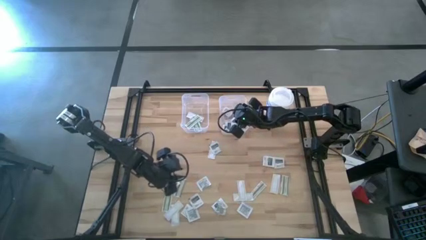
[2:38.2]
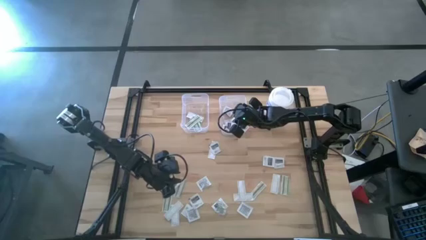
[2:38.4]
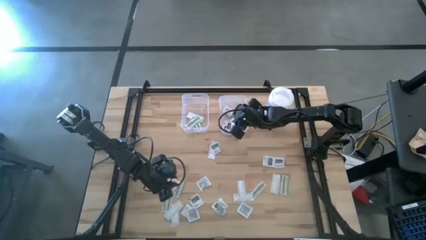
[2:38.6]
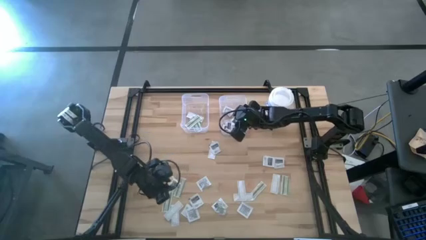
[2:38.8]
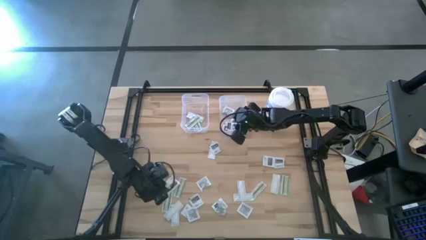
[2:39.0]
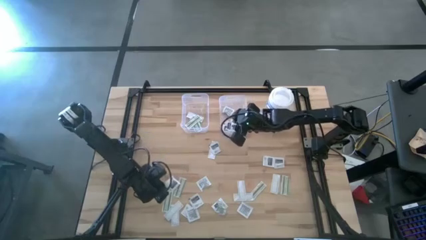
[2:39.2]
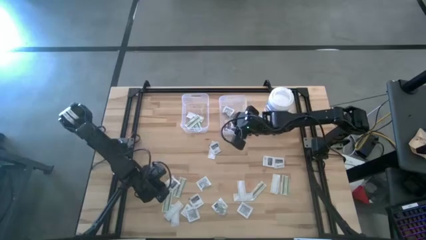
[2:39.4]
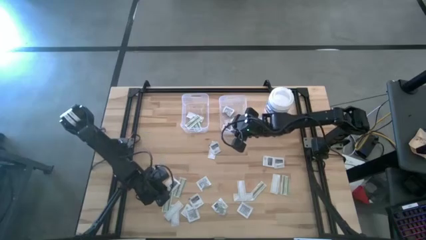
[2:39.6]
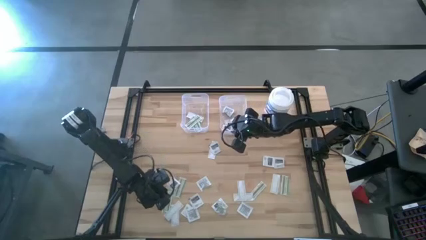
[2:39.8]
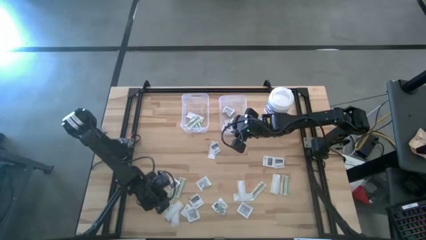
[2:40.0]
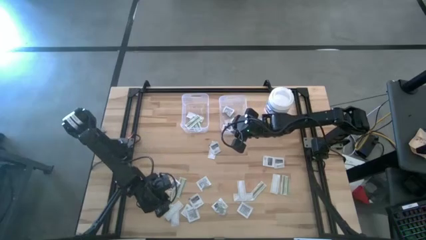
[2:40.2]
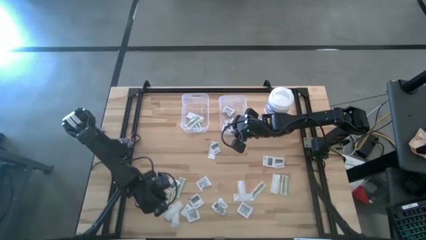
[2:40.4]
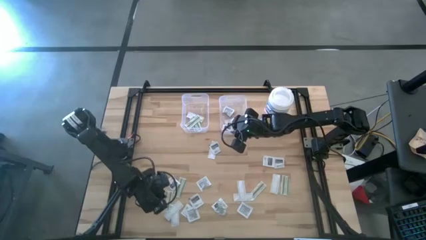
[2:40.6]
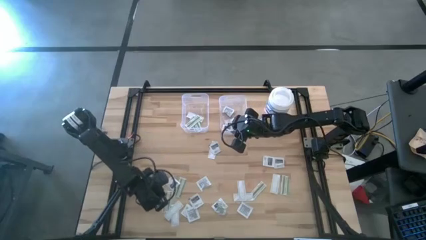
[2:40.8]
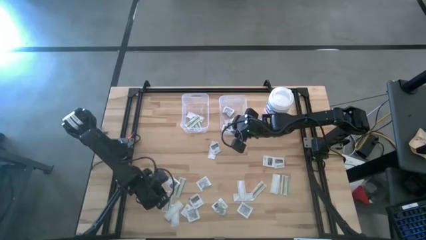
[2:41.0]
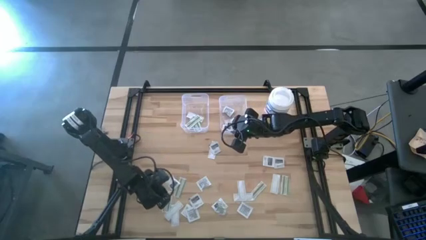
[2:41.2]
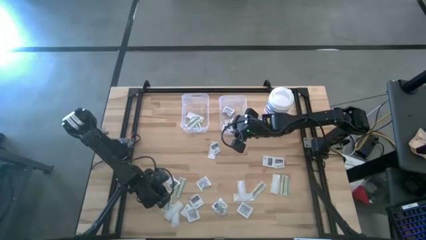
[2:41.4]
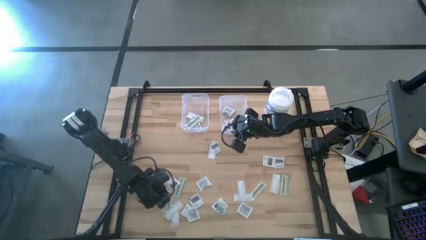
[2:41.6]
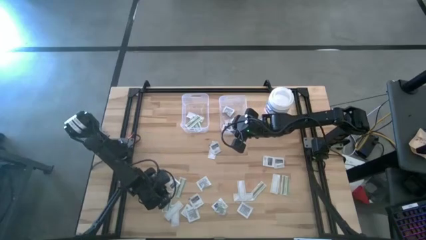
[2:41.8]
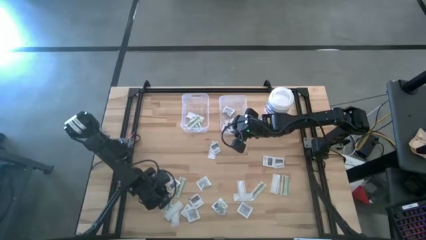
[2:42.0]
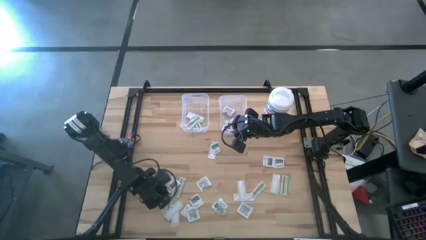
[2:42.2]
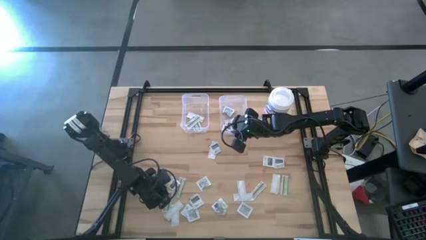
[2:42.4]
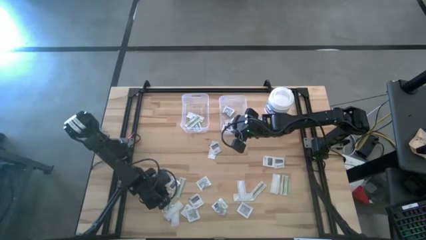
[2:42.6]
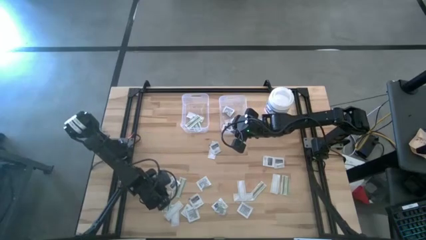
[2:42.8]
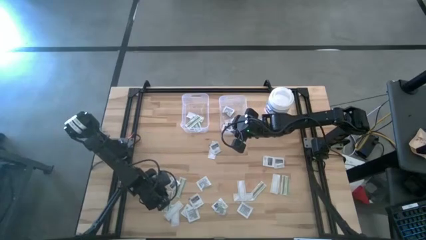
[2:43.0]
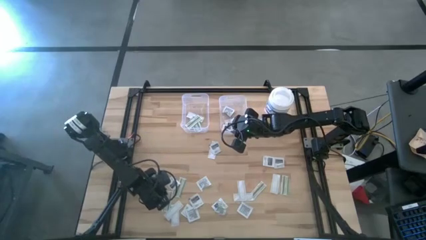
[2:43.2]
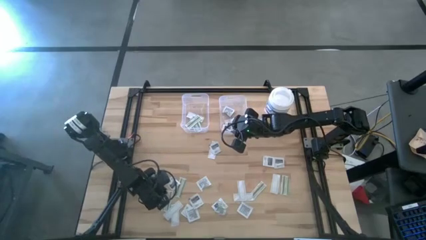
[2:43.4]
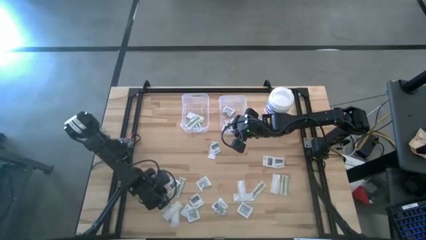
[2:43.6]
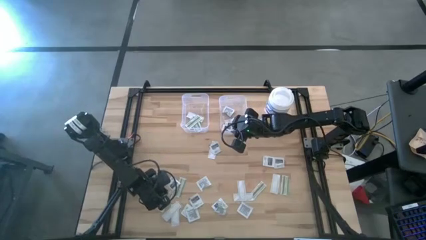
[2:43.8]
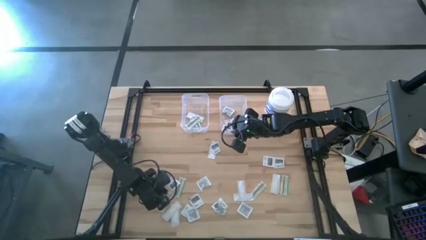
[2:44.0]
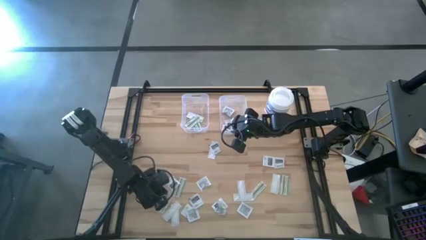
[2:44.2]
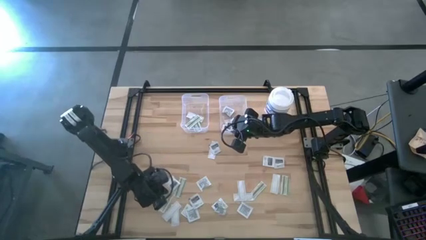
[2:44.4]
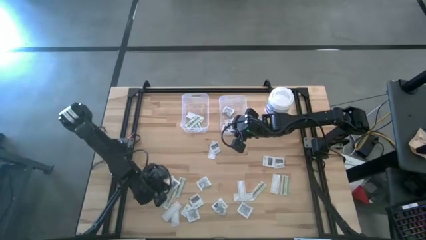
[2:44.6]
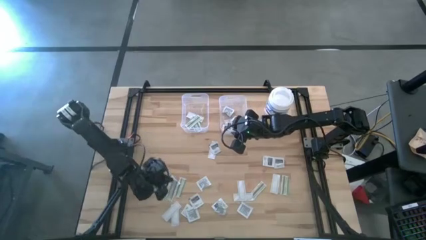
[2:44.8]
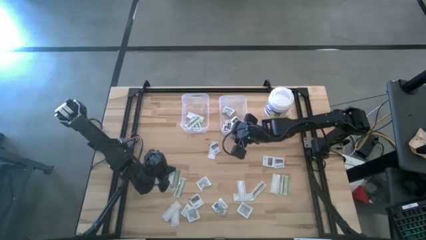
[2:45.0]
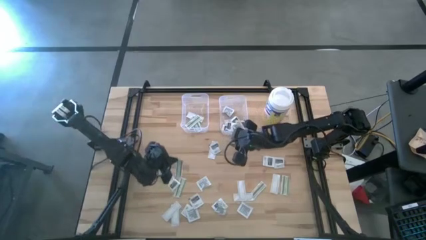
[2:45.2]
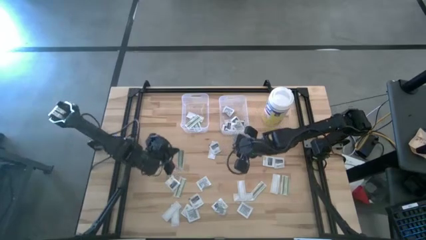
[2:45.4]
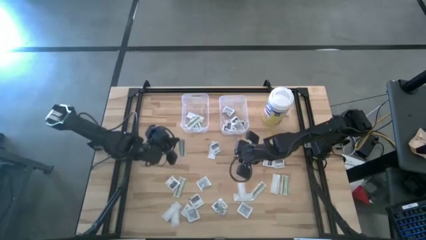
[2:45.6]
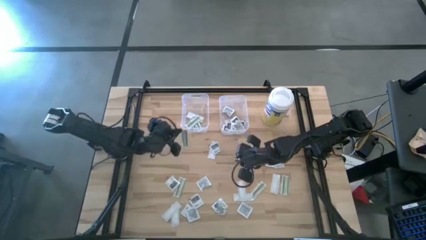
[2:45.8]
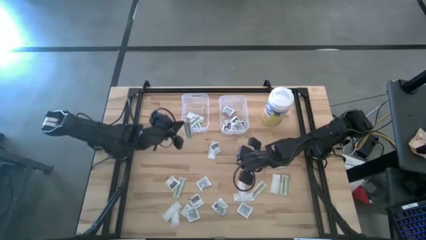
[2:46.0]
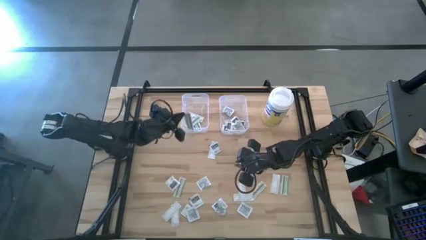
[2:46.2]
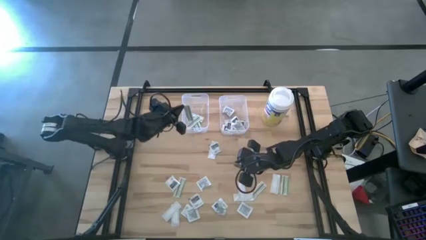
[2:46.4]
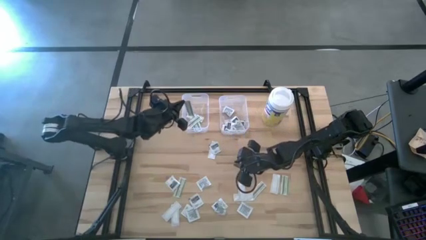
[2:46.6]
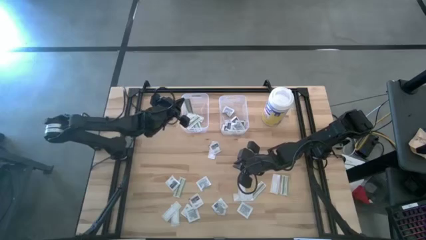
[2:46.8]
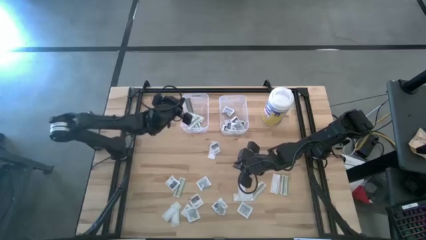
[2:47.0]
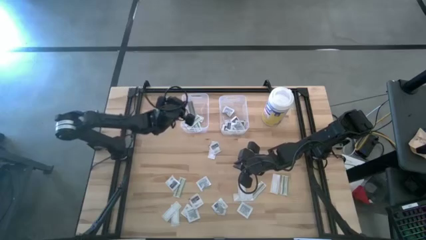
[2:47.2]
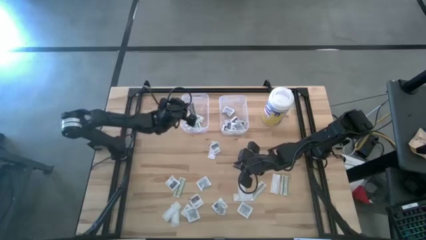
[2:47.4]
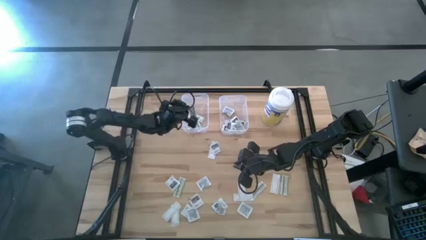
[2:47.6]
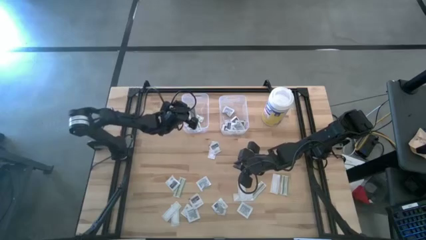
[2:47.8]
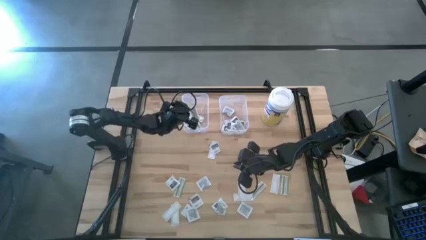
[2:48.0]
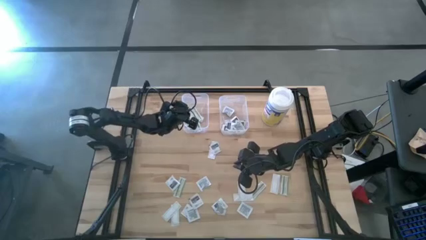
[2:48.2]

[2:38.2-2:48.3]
Task: Pick & Place First Aid Supplies
Put the green bandage pack into the left transparent bin

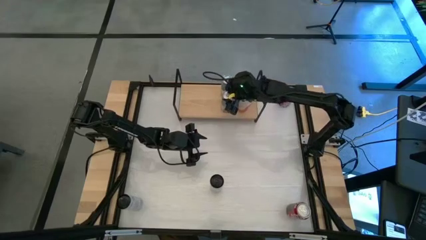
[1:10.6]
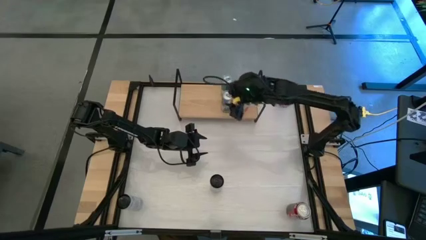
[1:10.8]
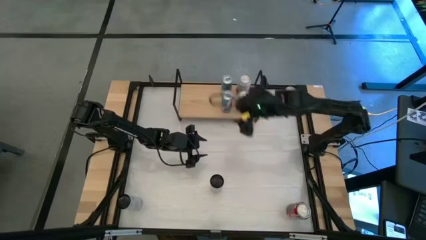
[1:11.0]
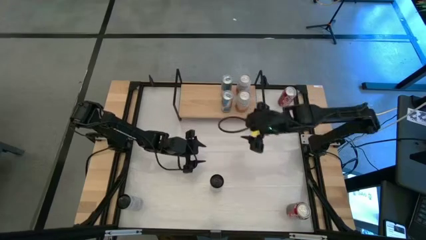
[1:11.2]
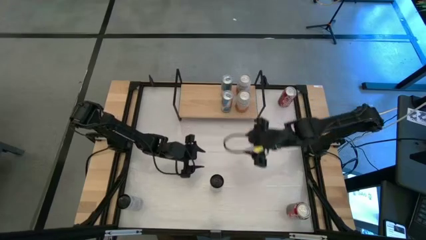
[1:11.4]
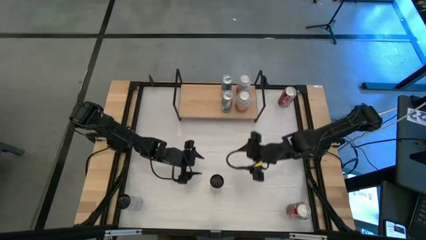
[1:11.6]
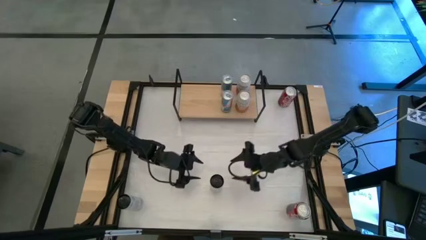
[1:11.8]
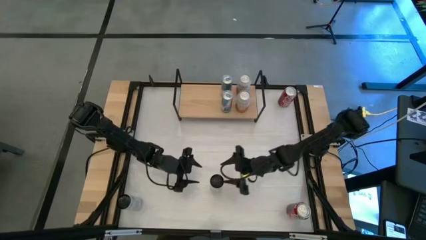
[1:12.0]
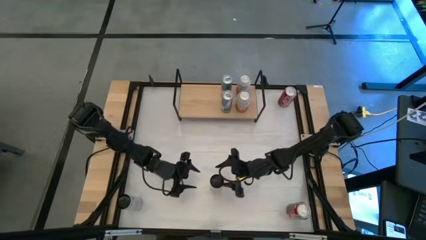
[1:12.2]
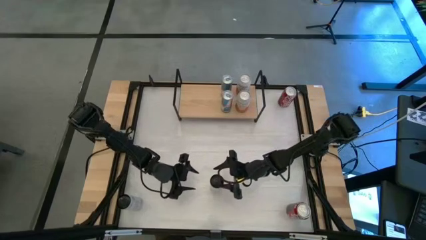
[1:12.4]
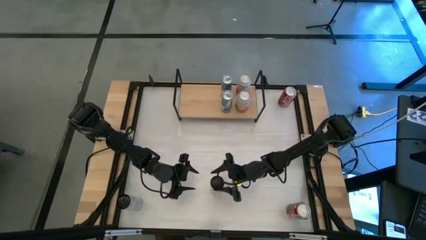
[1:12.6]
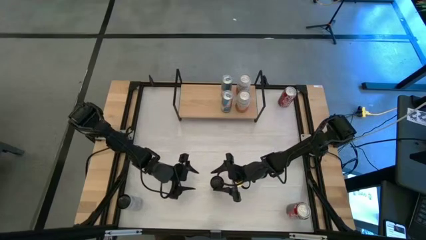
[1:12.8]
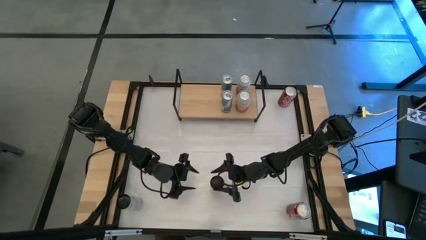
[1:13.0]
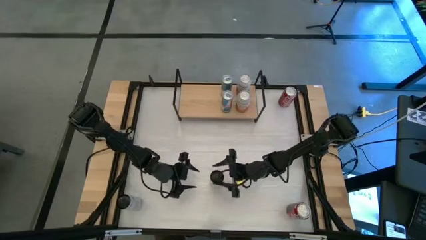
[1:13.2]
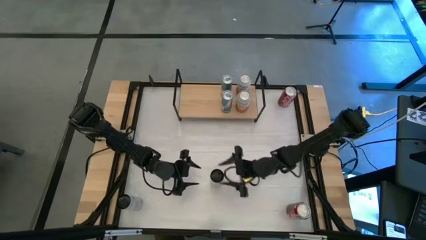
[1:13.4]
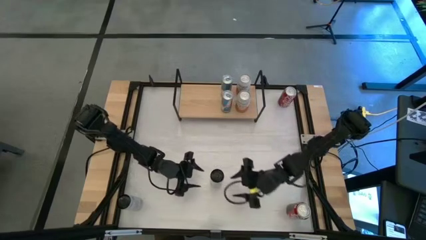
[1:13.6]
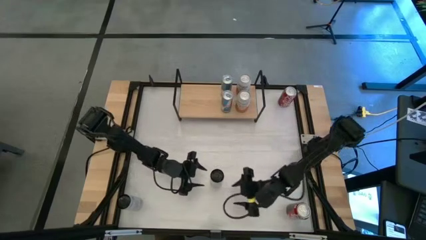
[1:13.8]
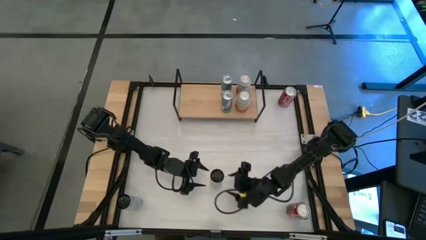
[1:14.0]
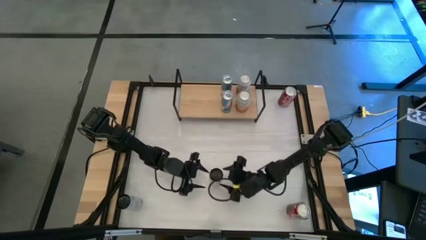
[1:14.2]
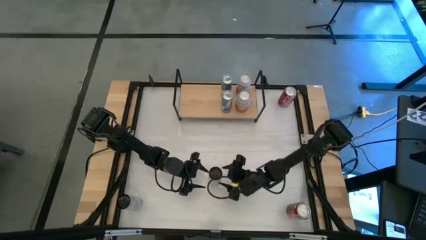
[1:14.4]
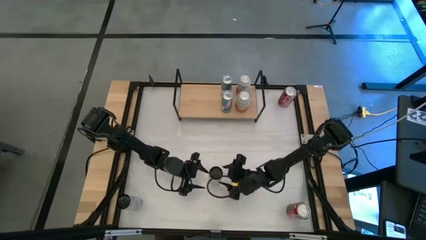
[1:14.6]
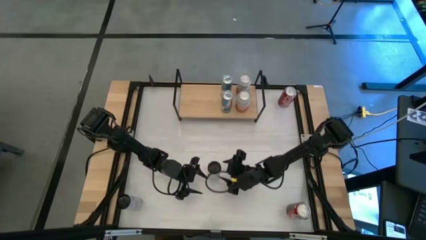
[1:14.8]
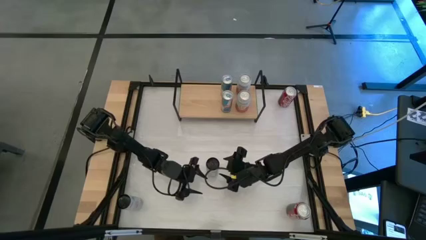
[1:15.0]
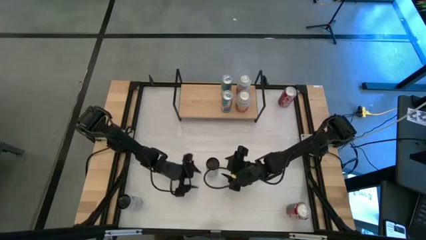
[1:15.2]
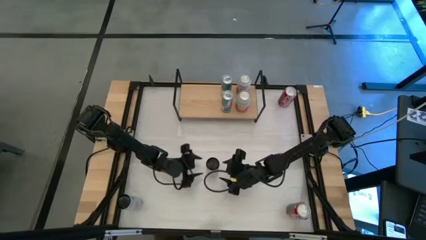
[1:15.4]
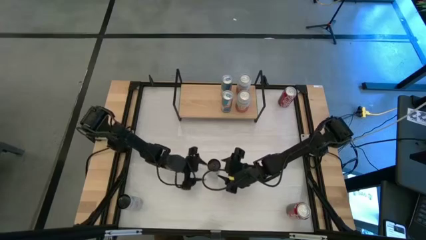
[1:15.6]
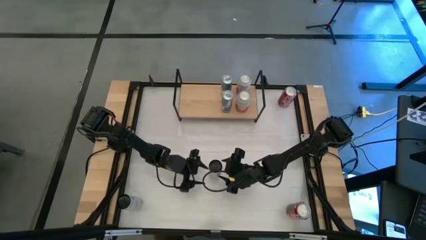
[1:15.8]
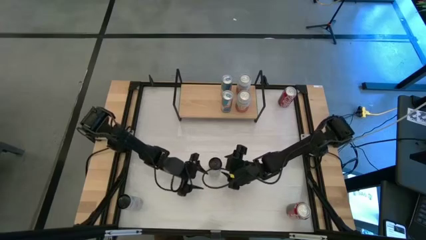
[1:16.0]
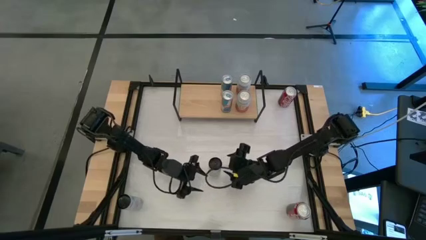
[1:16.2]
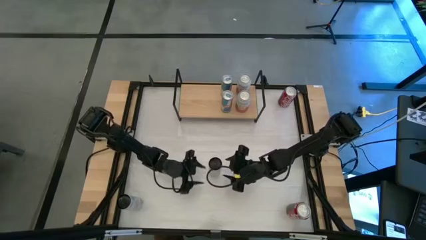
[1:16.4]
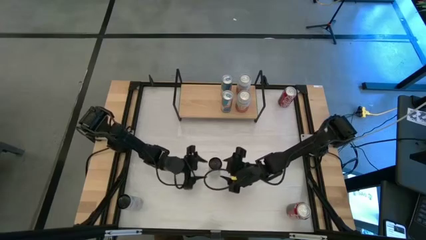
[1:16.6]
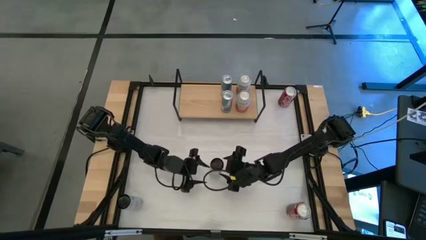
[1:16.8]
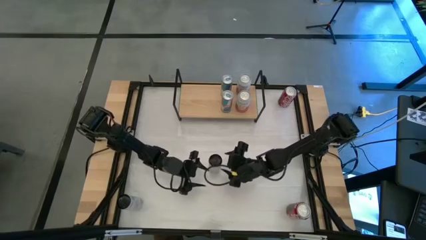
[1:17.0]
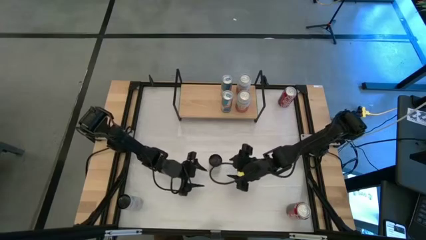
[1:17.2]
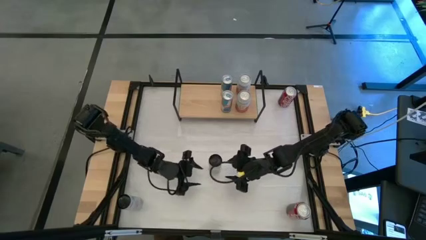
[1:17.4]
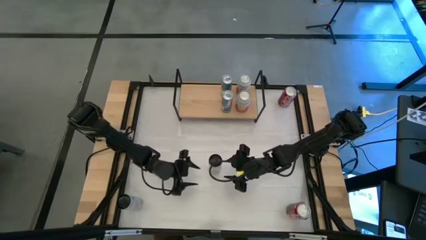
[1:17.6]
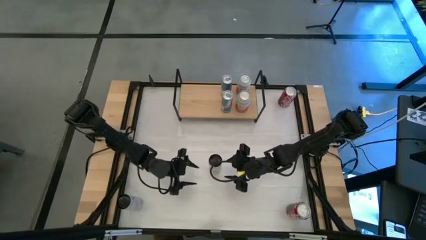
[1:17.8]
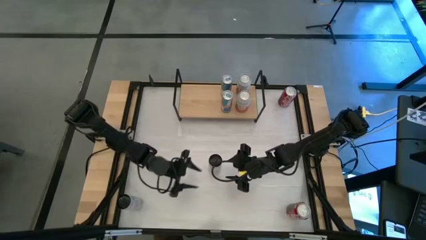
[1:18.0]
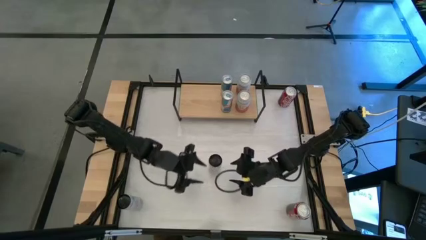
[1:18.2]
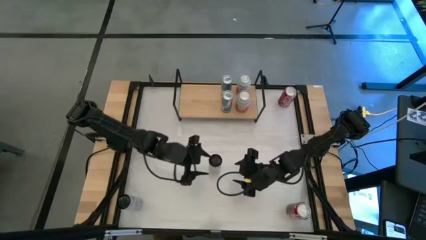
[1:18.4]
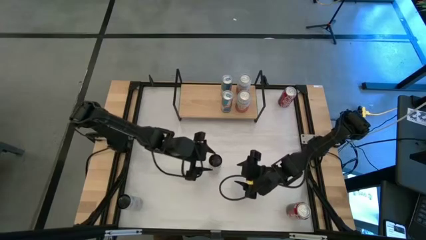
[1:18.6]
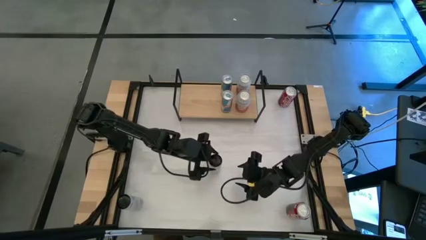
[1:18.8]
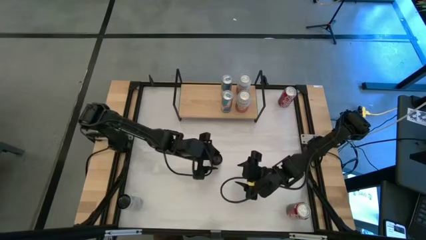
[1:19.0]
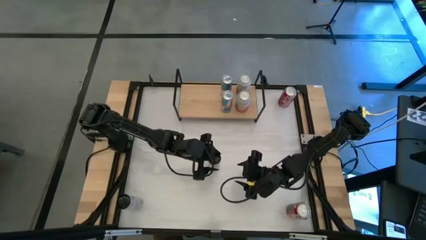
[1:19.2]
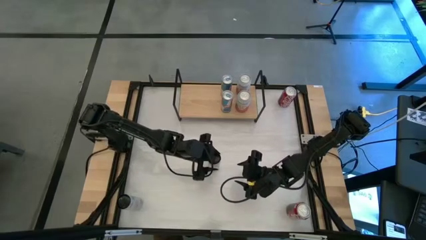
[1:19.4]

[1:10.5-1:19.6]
Task: Place canned beverage on shelf
Adjust white soda on the center
